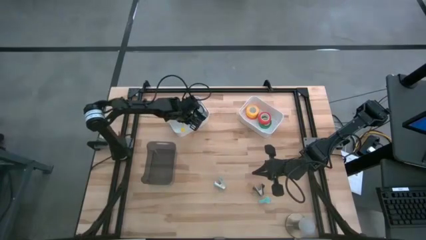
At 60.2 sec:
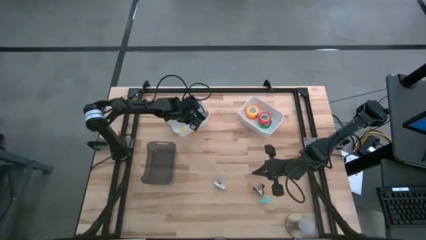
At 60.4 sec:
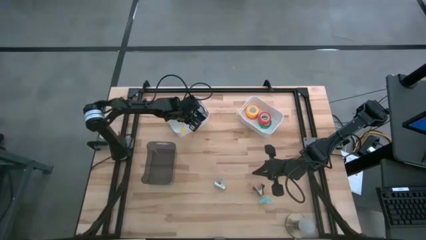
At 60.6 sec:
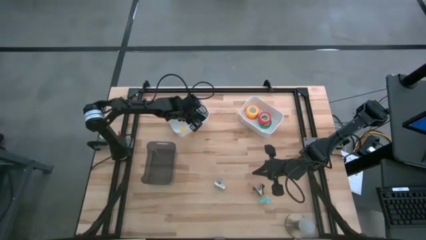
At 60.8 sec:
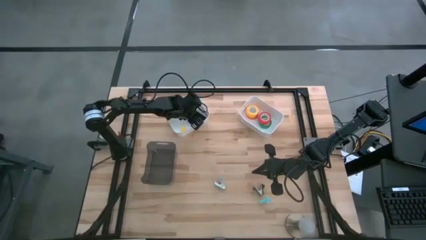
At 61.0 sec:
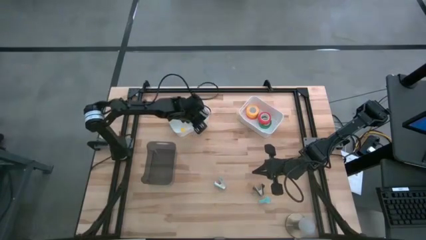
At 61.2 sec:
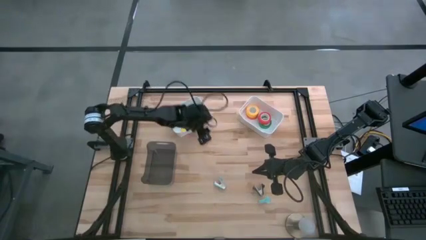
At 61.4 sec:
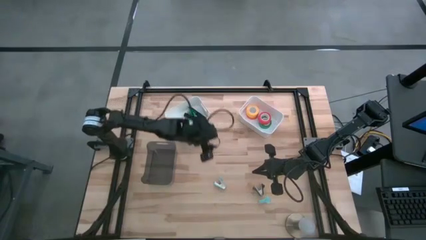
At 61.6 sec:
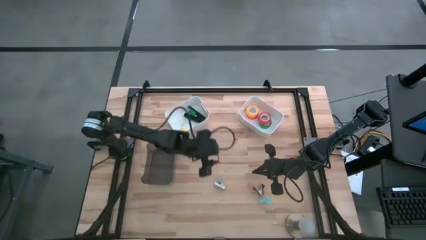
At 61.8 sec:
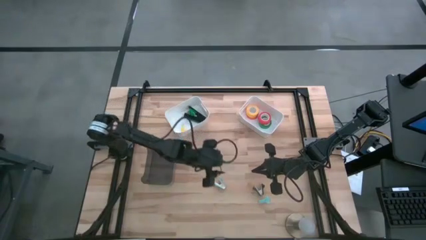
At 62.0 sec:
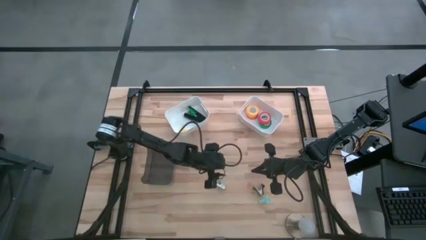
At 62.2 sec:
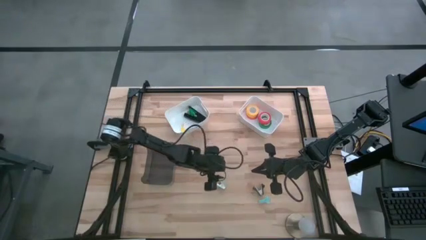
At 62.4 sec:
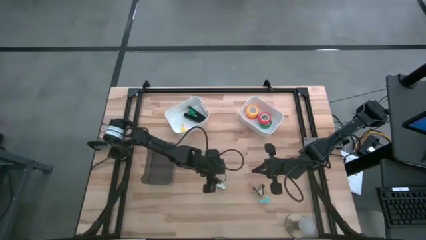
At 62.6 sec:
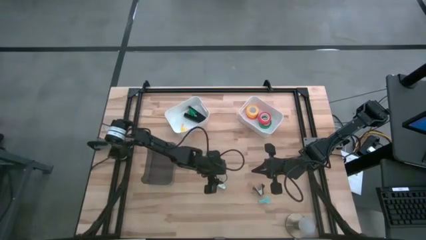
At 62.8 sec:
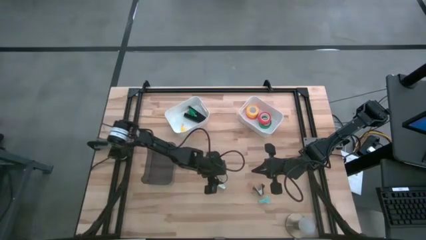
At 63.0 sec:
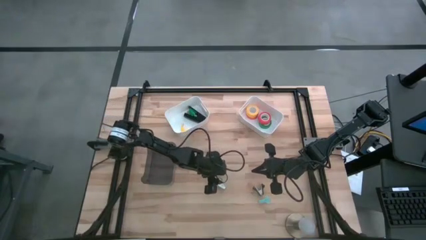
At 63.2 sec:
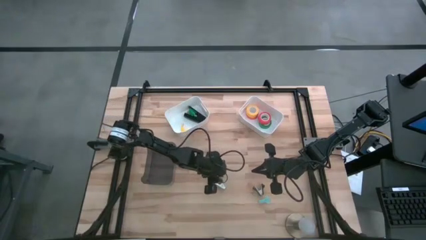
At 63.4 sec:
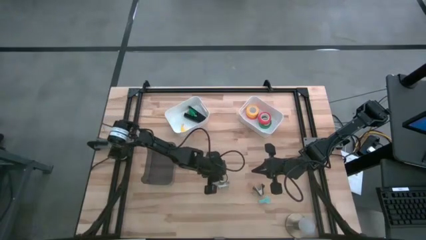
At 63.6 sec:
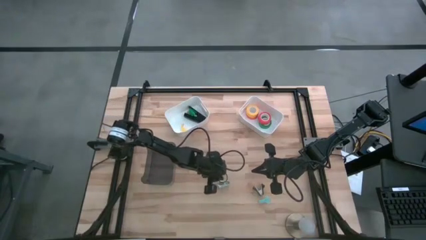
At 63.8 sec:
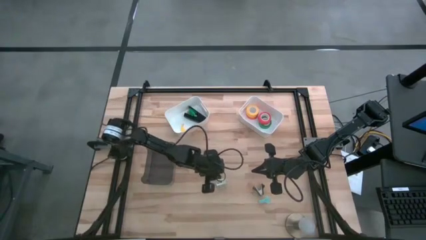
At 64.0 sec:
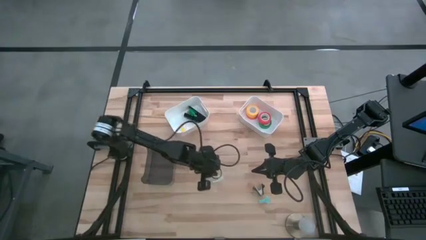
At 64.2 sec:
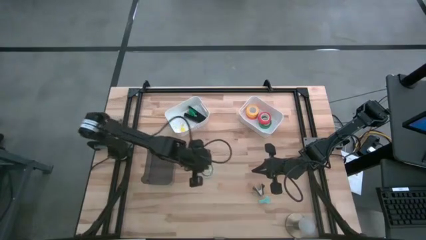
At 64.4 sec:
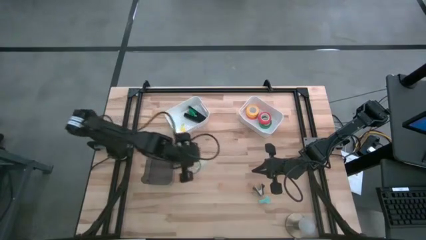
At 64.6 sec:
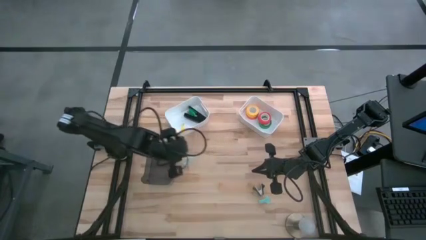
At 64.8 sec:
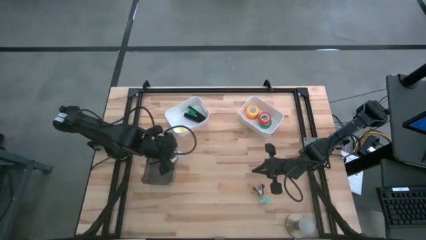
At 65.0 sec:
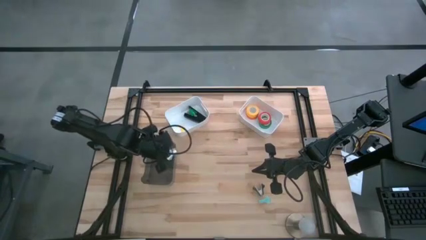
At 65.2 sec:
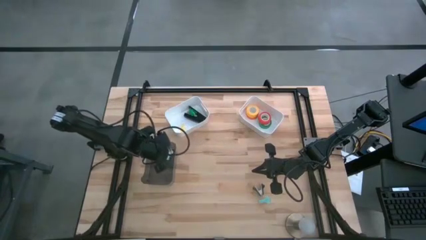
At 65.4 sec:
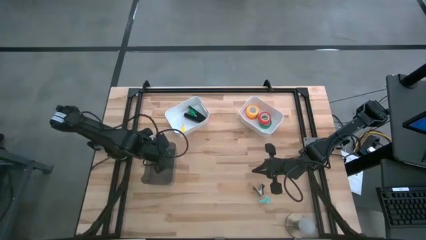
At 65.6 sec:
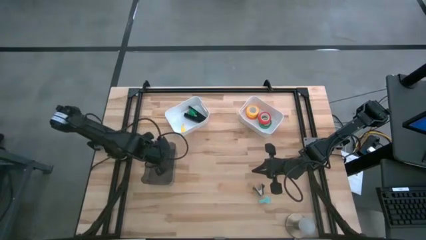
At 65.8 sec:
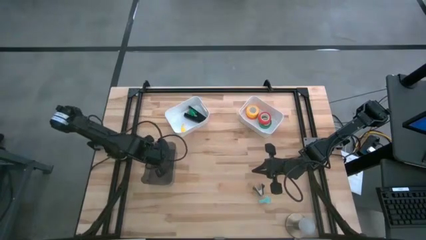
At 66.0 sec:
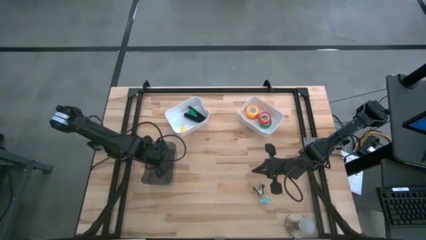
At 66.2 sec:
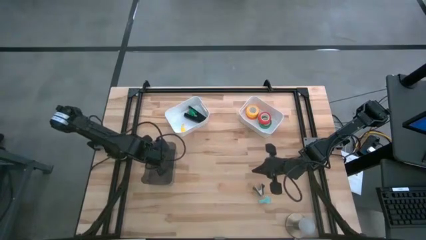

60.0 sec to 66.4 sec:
Task: Pick and place Stapler, Stapler remover, tape
Put the left blue staple remover into the black bin

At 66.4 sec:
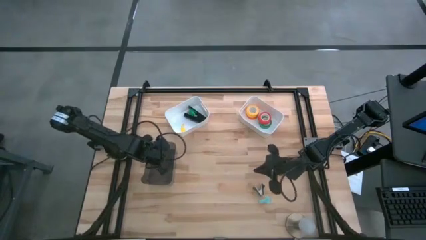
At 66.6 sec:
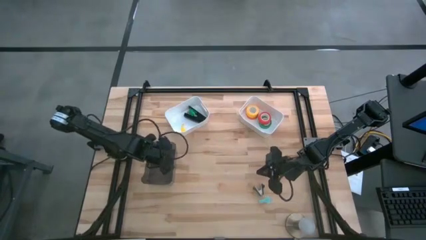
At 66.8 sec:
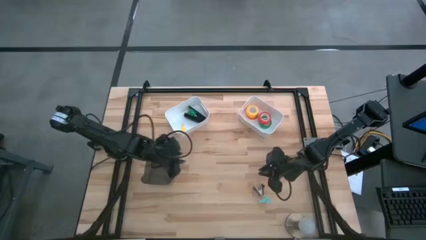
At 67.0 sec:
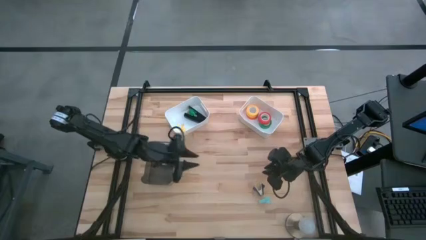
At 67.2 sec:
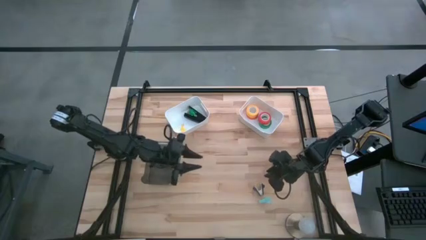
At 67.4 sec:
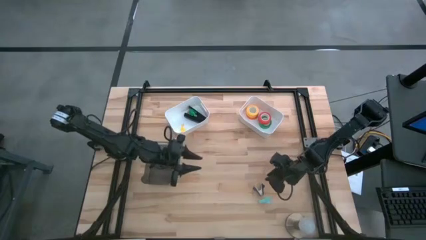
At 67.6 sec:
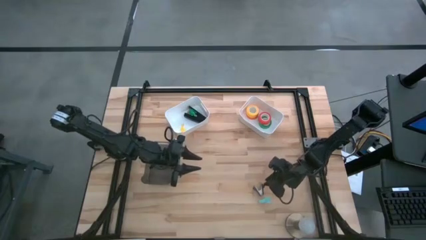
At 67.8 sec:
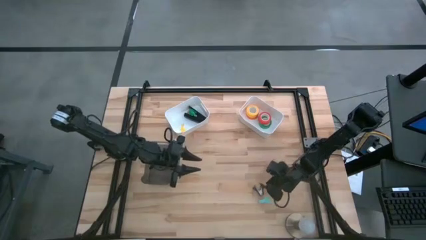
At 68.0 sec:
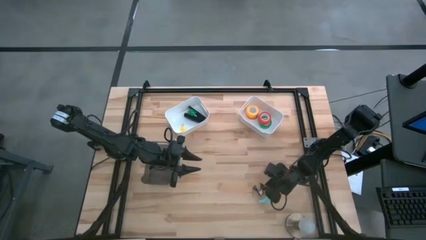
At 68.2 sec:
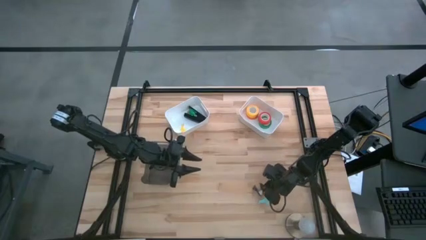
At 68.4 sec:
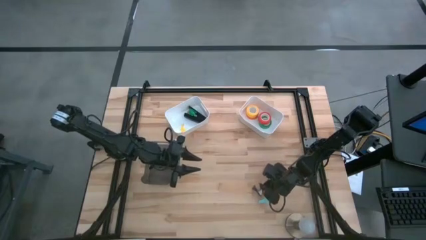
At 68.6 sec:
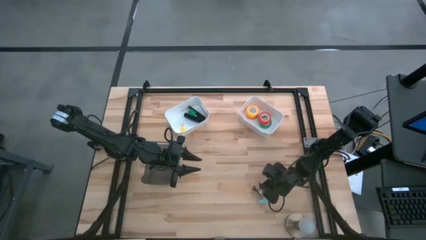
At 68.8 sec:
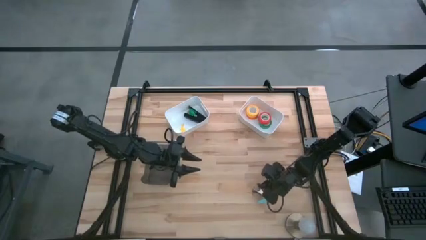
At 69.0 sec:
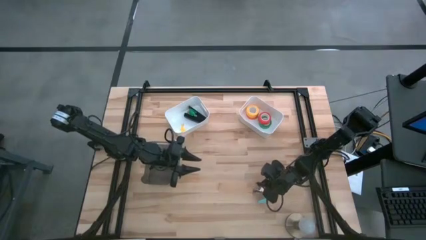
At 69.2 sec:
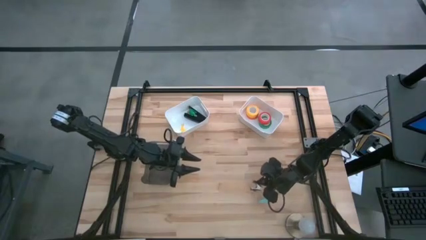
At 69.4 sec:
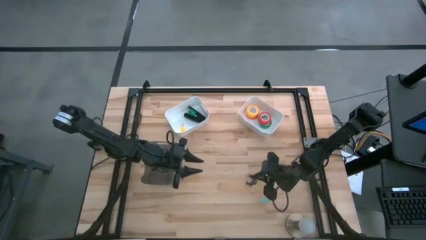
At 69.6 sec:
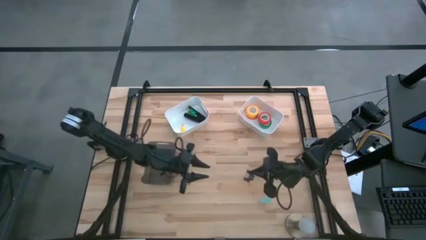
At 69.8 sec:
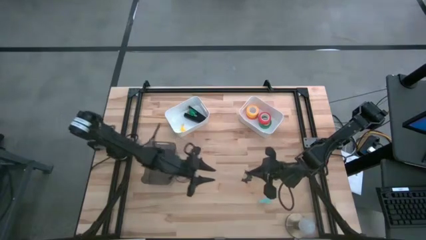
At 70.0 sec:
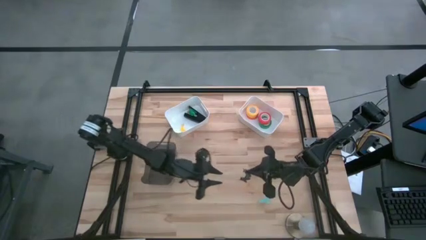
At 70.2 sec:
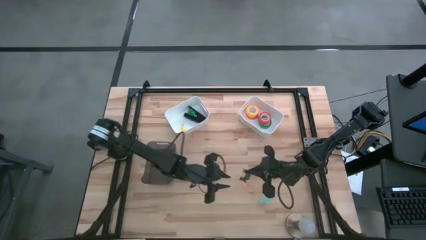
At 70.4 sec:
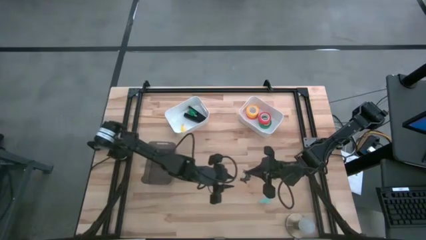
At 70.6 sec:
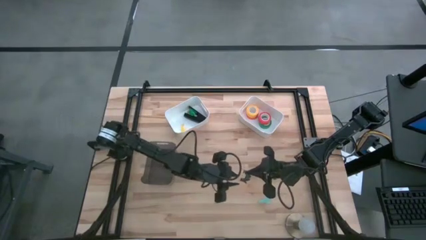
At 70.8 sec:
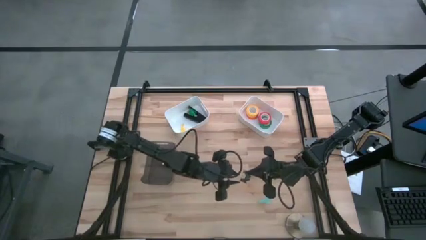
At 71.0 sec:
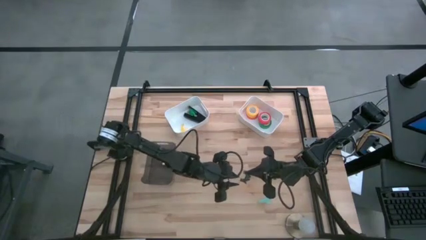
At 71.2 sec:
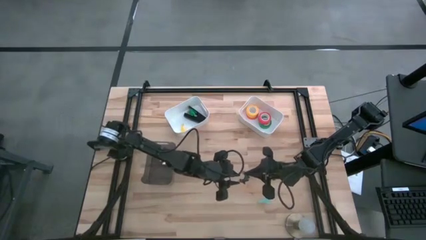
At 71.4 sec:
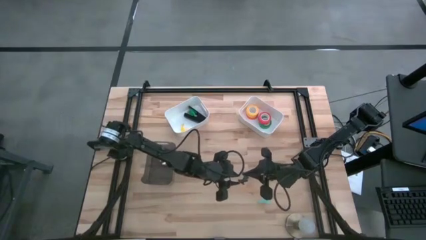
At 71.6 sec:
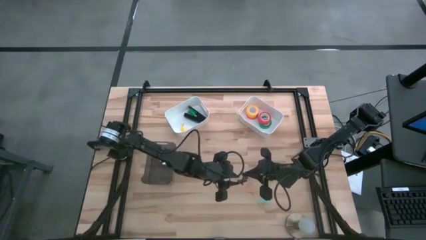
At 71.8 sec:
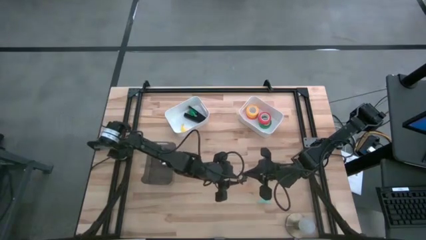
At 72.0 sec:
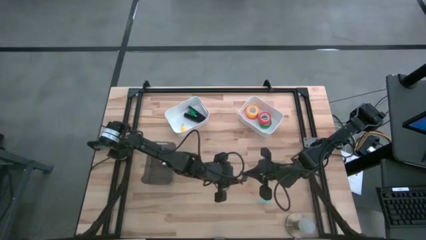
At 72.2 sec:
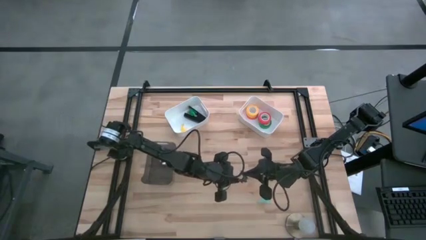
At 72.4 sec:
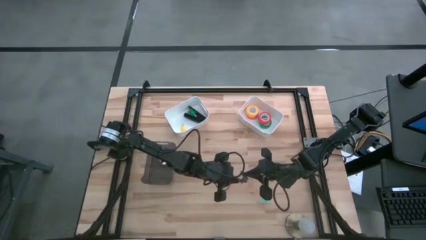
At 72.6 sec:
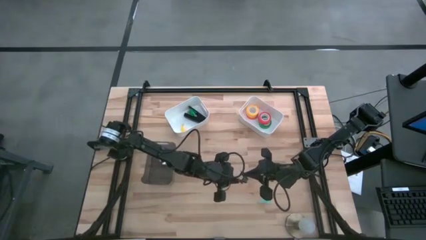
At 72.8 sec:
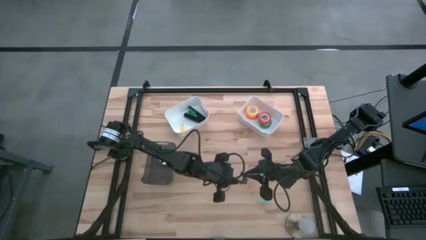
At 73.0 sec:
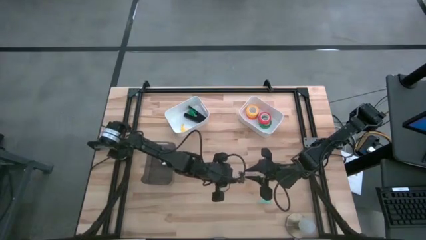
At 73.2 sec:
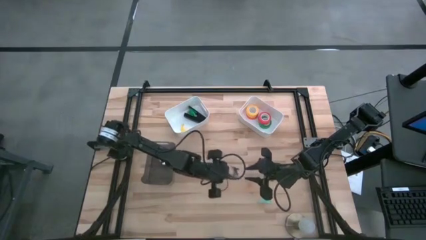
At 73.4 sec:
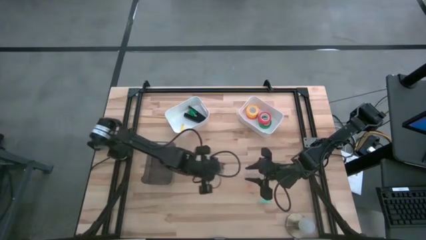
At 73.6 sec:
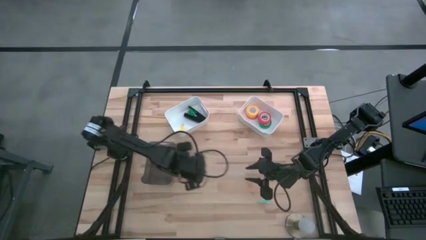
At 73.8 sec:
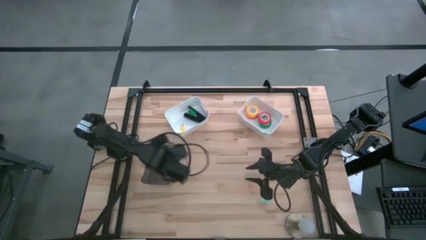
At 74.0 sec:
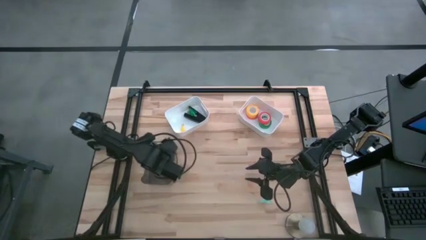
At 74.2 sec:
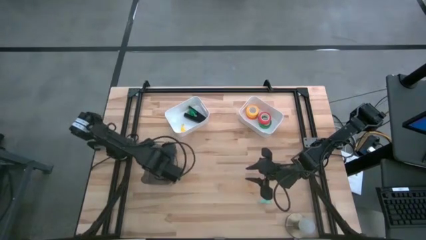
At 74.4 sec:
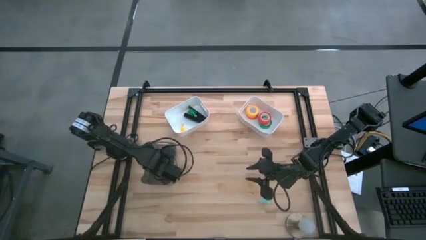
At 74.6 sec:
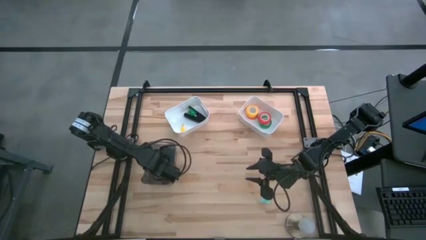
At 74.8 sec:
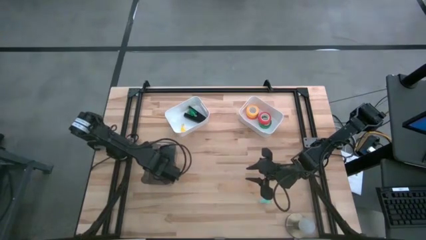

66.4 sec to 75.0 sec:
Put the black staple remover into the black bin
